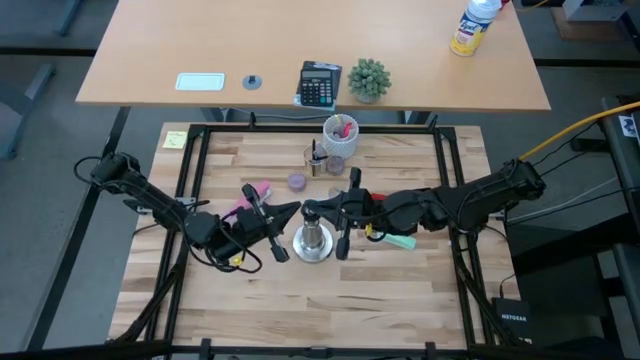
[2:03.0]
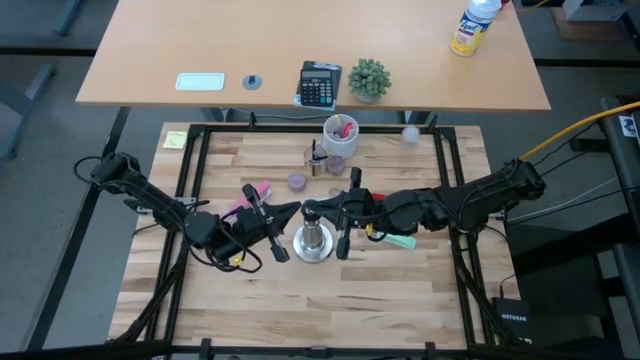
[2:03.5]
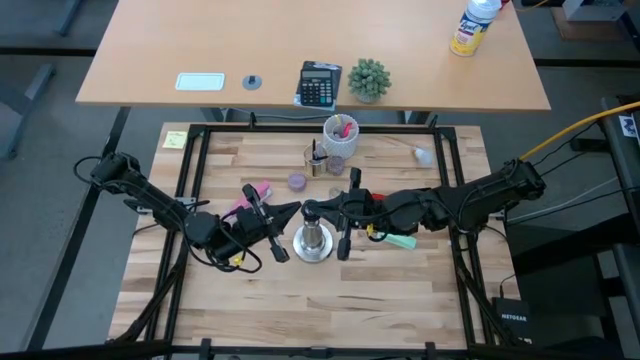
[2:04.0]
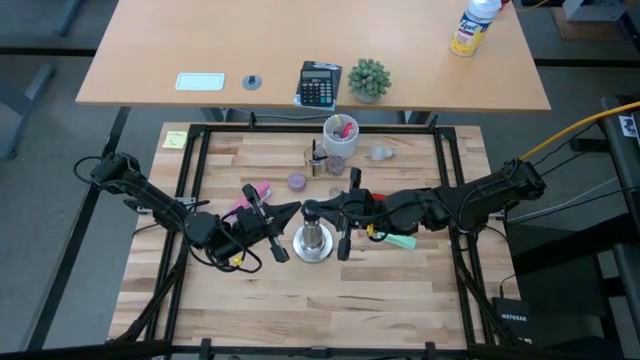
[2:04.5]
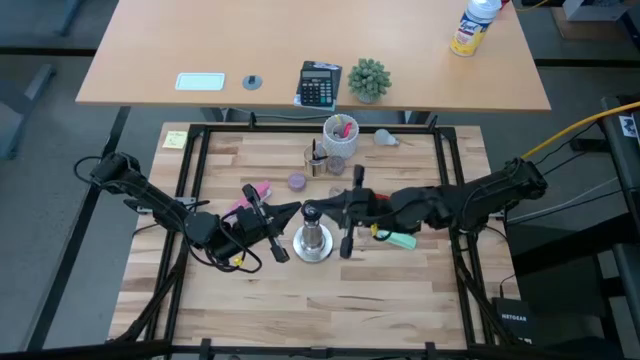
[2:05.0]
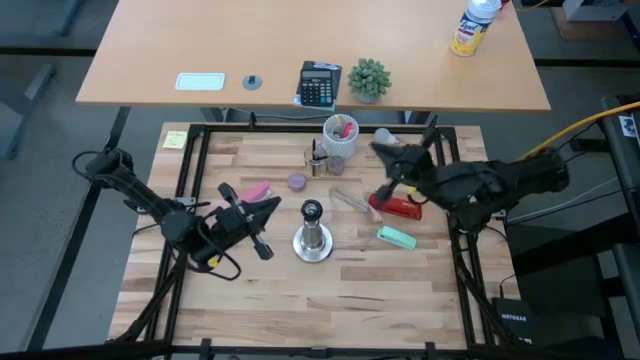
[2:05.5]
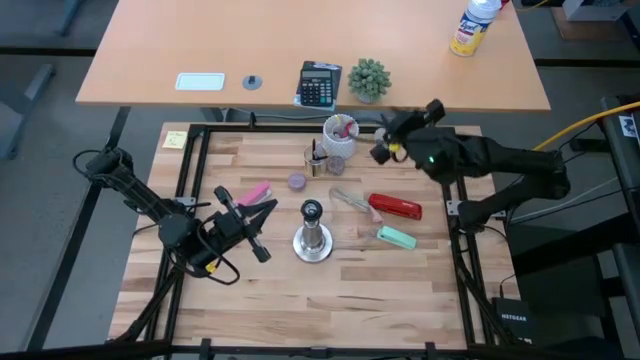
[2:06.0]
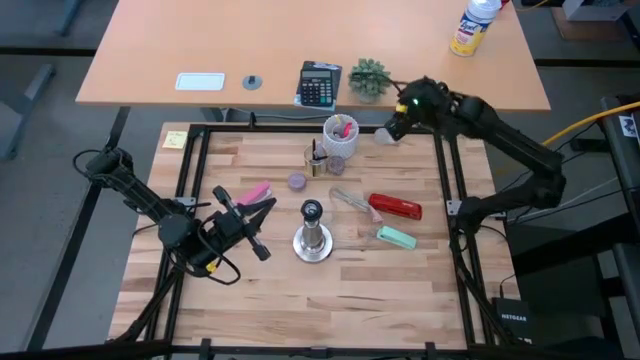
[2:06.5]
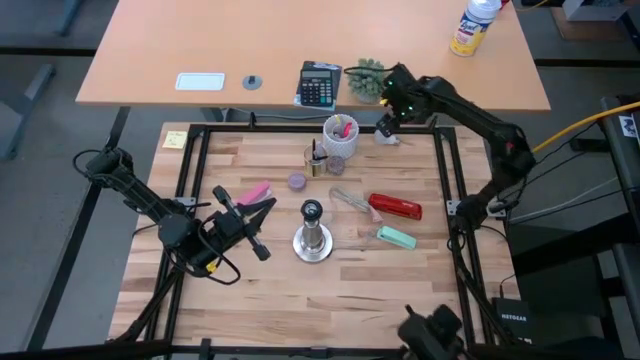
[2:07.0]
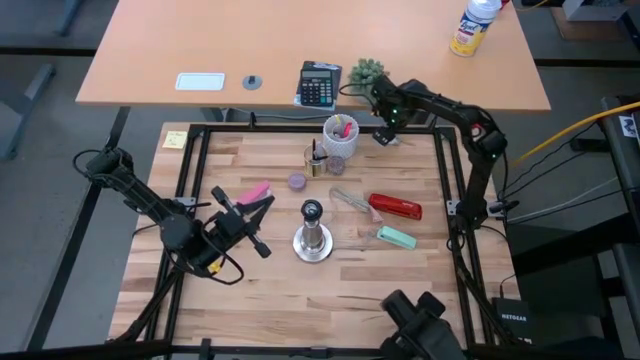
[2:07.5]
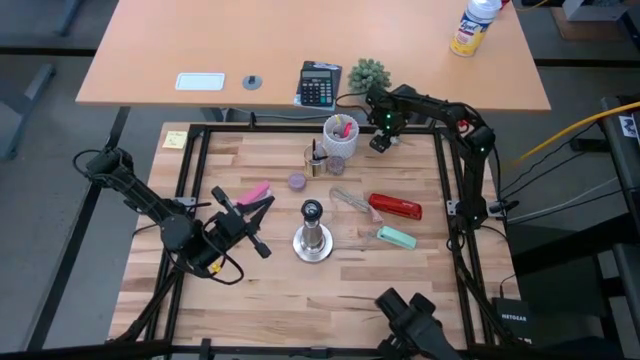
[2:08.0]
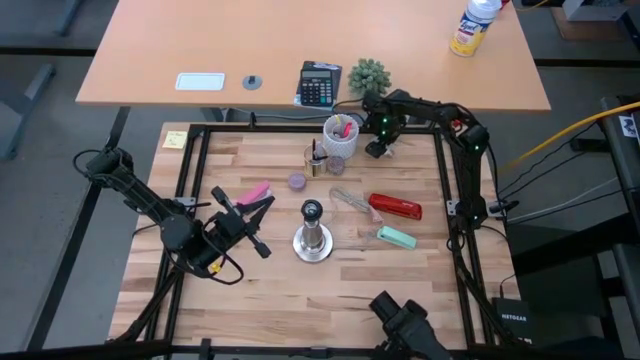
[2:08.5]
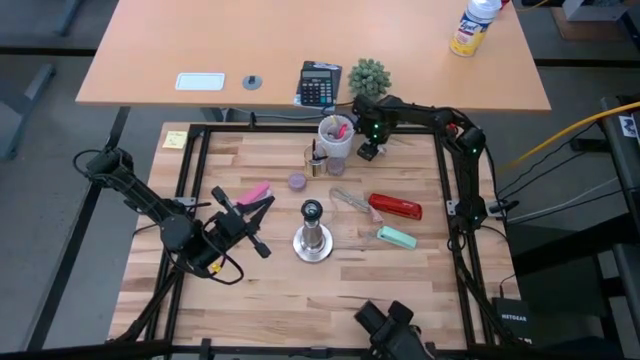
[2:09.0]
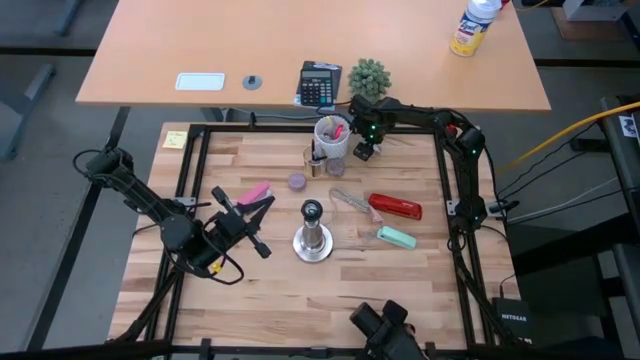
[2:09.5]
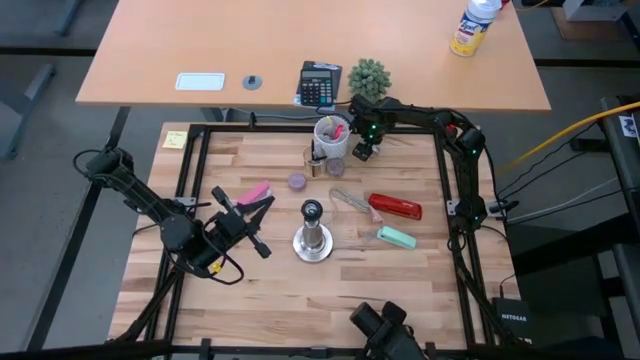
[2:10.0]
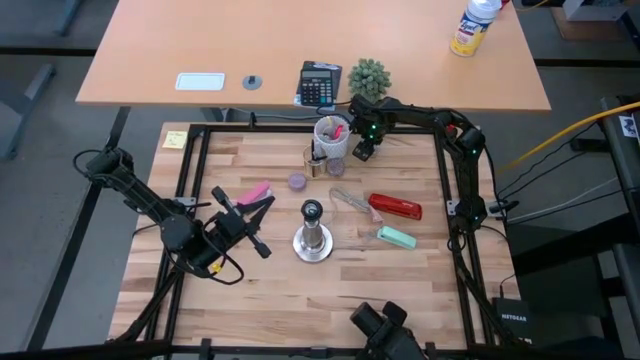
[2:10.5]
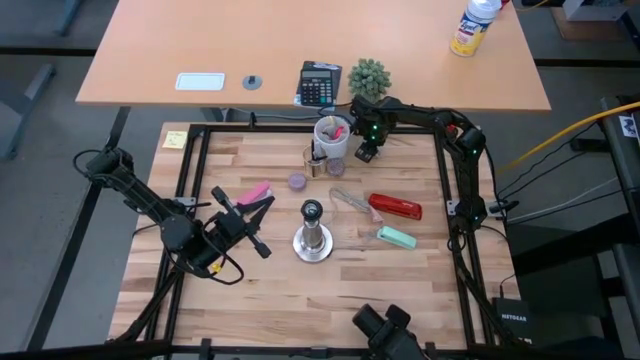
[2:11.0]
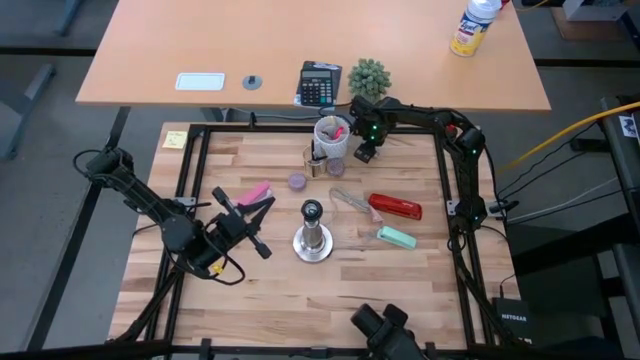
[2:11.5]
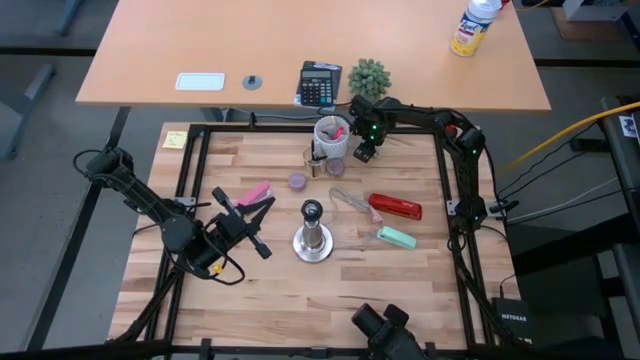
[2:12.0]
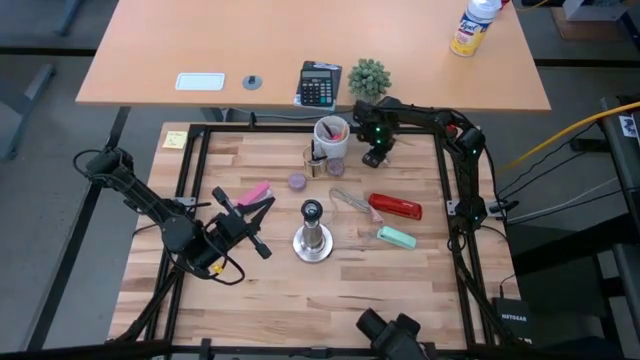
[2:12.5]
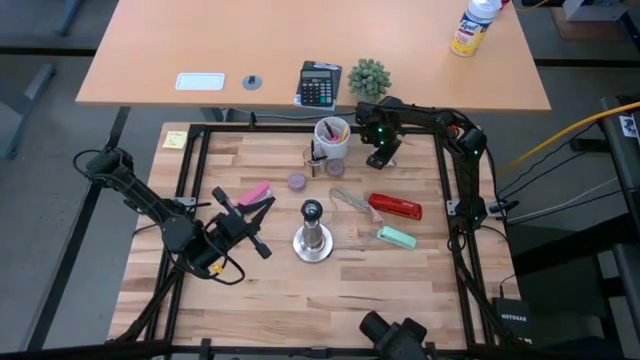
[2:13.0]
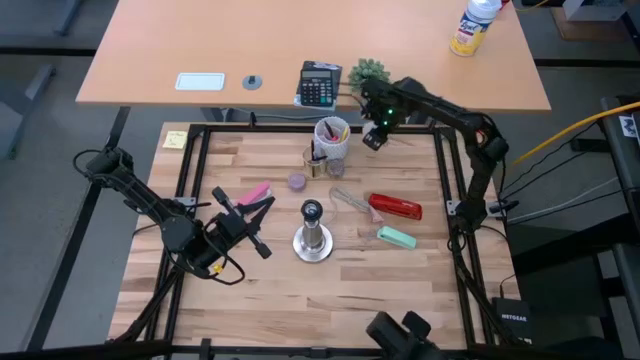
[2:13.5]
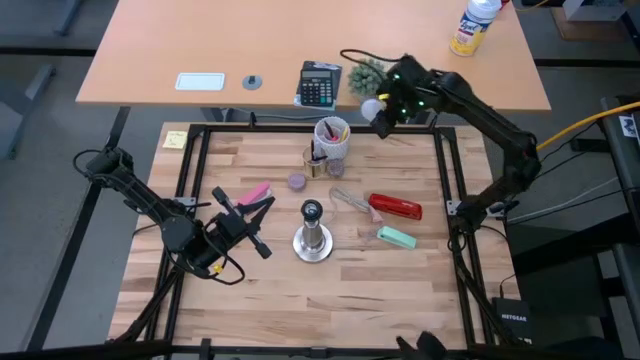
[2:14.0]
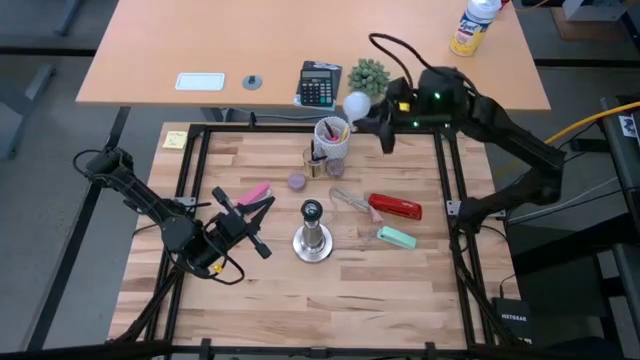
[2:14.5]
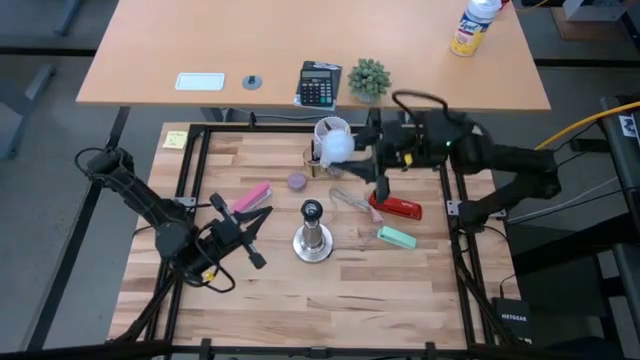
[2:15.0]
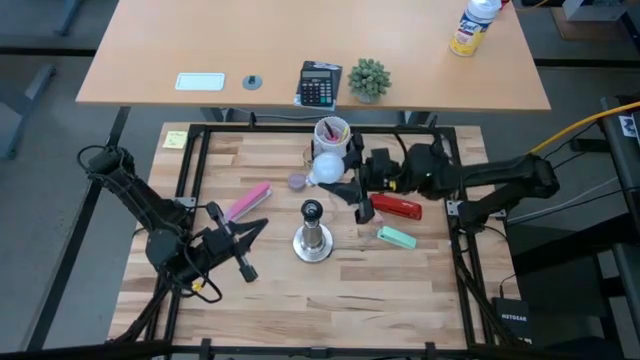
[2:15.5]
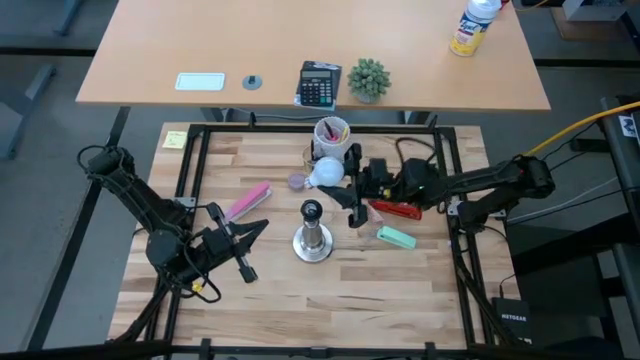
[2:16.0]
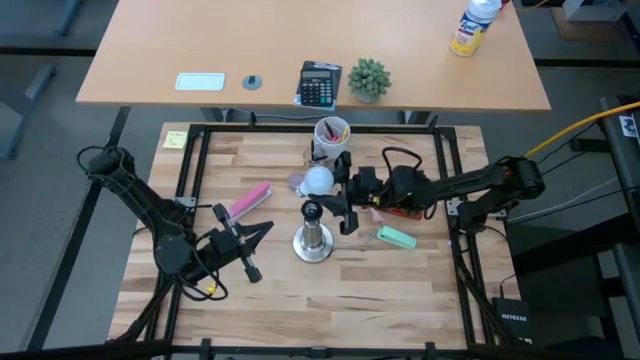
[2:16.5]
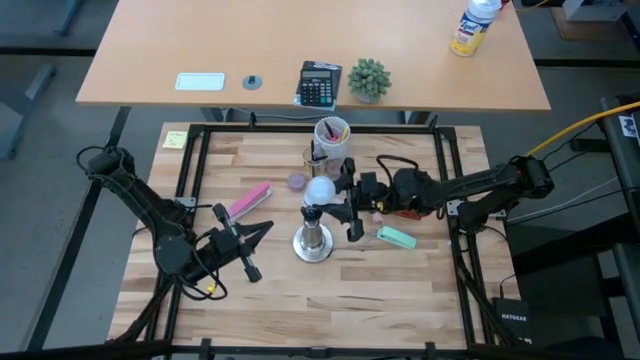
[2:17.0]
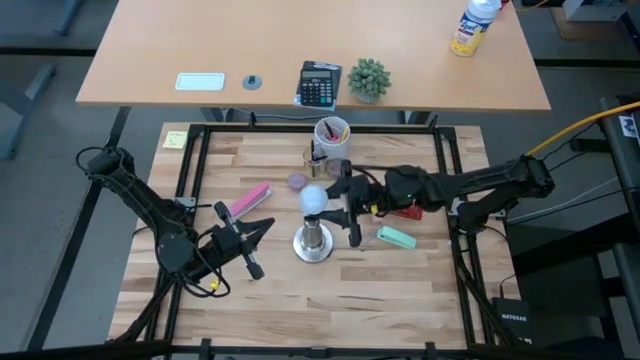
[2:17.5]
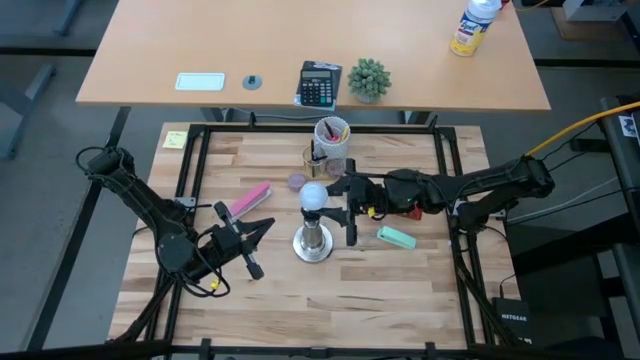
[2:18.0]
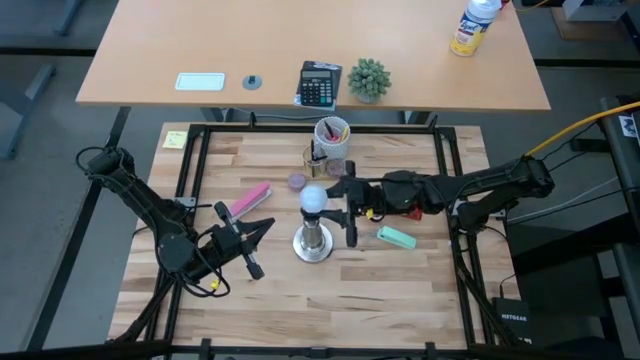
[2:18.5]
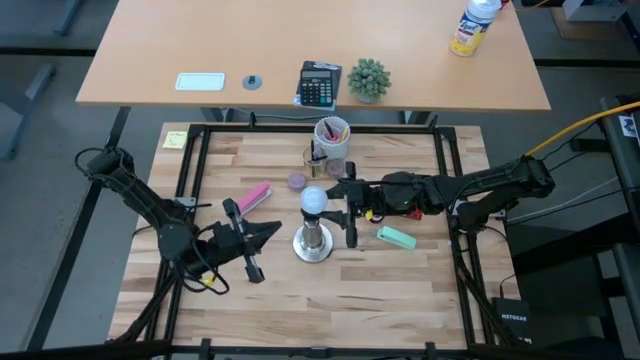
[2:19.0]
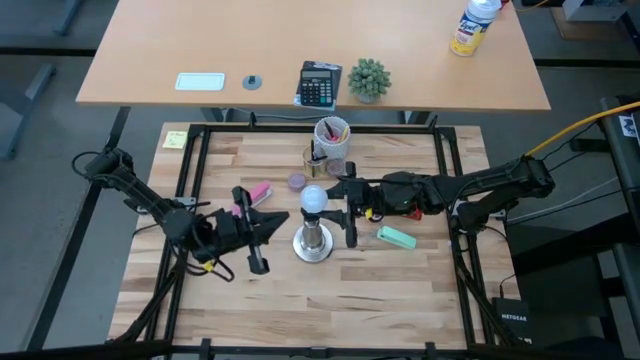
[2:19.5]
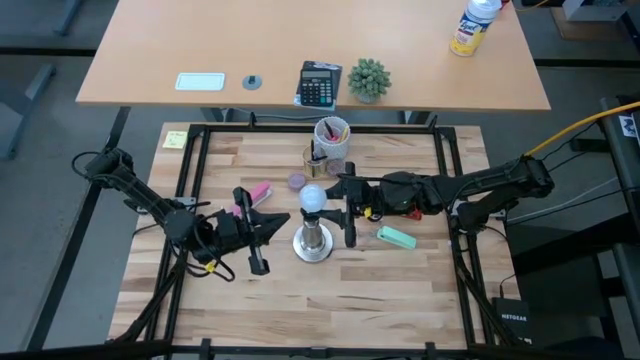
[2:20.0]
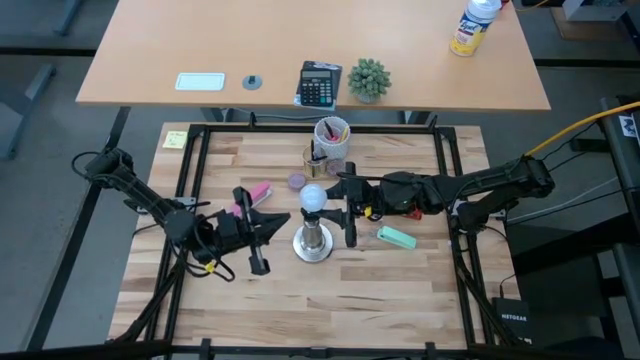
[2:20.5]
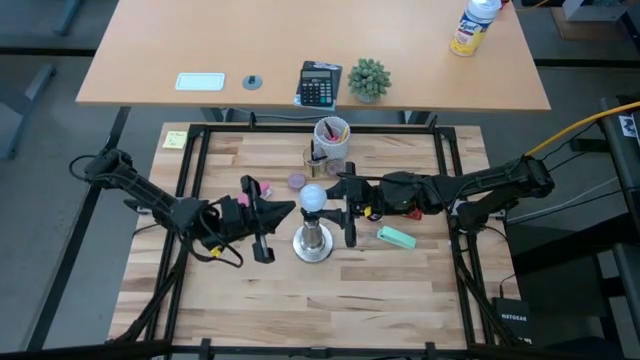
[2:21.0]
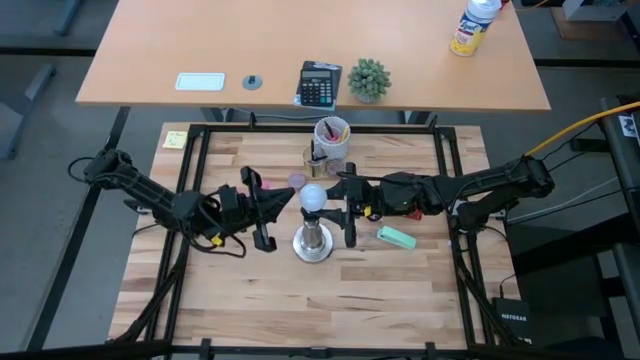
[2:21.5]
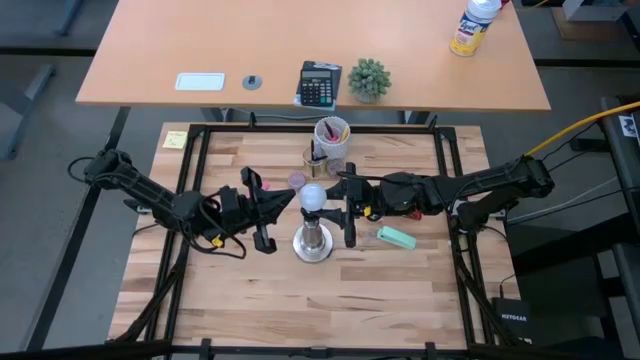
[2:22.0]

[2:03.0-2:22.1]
Task: Screw lightbulb
Insert the lightbulb into the lamp socket

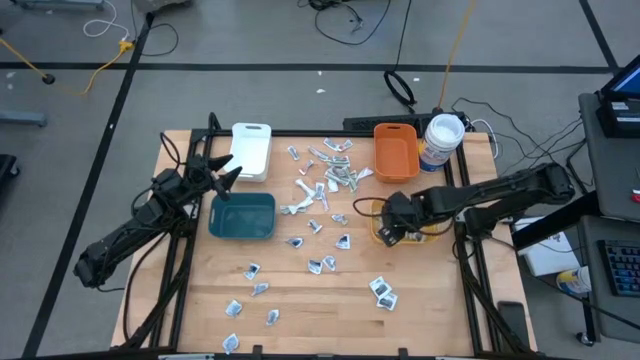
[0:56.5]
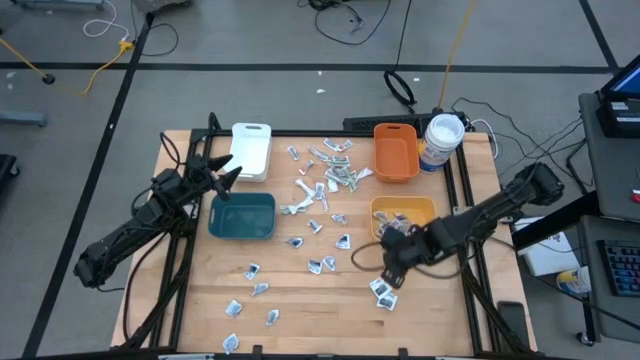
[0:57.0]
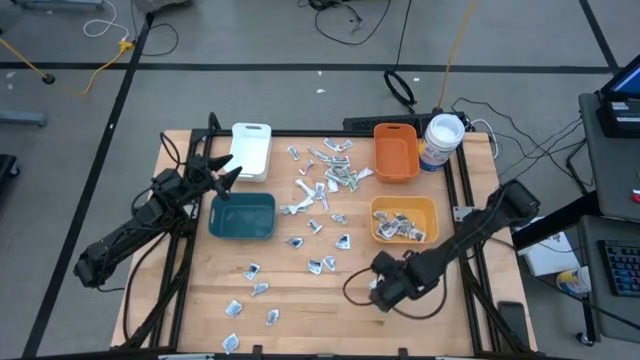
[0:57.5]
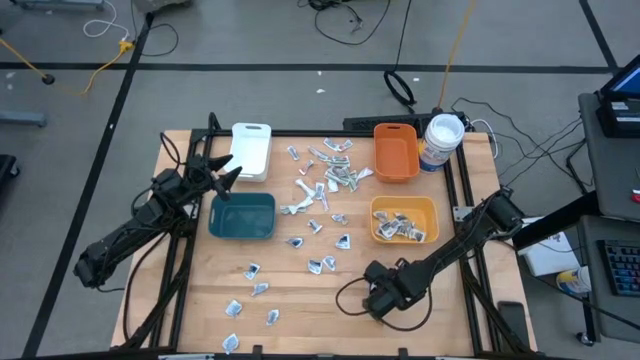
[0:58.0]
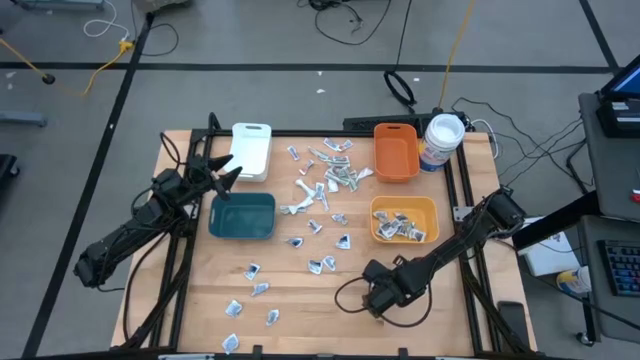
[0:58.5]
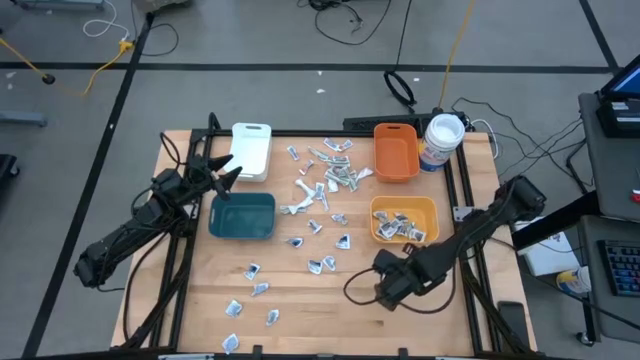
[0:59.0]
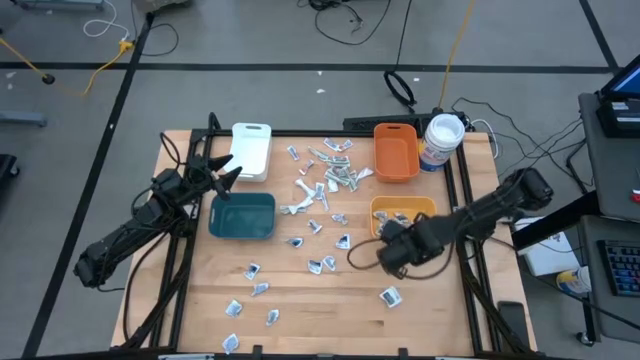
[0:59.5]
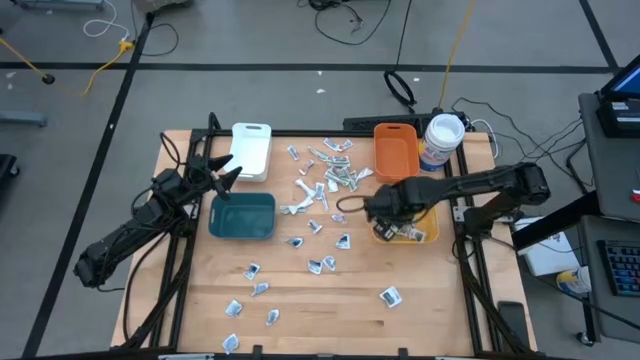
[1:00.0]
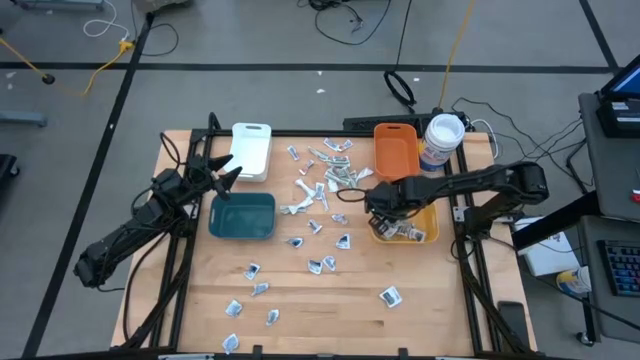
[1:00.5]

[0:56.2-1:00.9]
Task: Pick & Place First Aid Supplies
Put the antiseptic towelette into the yellow bin
